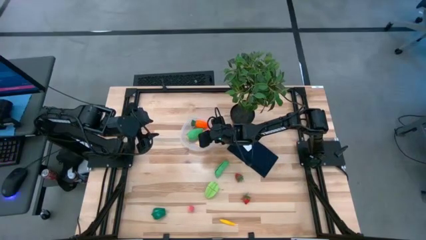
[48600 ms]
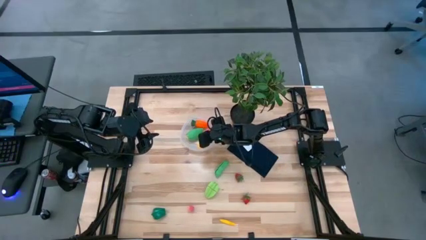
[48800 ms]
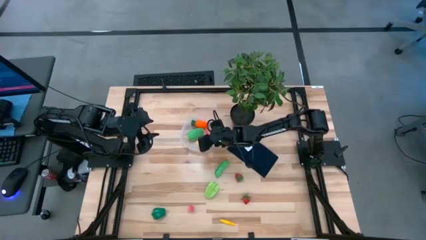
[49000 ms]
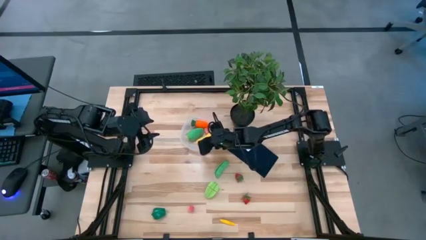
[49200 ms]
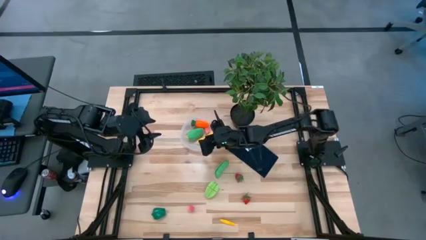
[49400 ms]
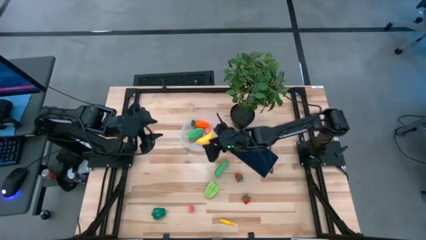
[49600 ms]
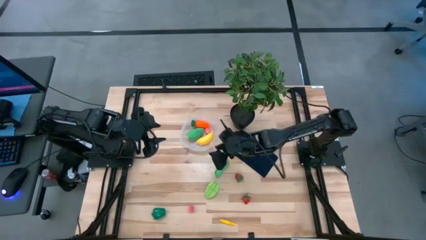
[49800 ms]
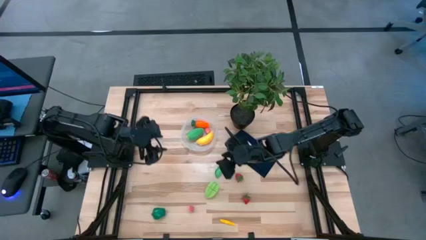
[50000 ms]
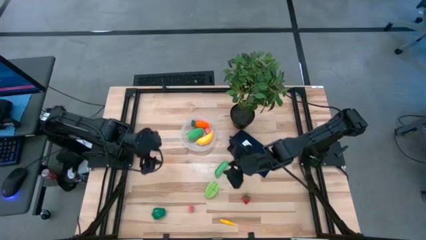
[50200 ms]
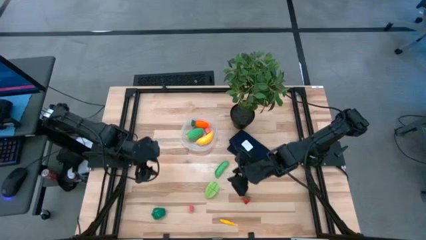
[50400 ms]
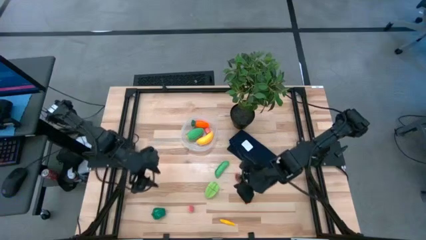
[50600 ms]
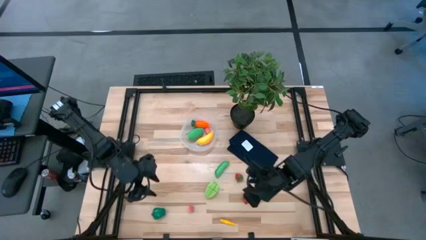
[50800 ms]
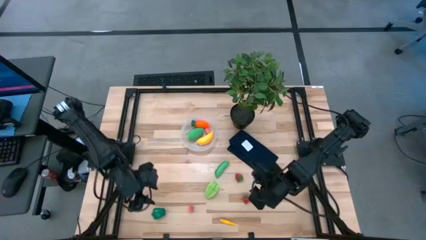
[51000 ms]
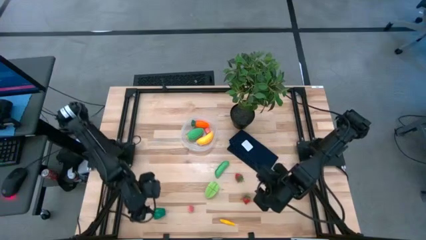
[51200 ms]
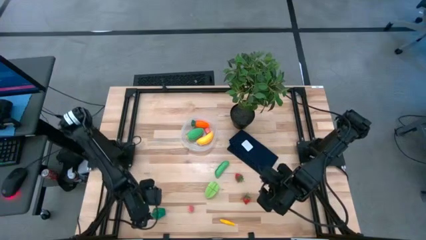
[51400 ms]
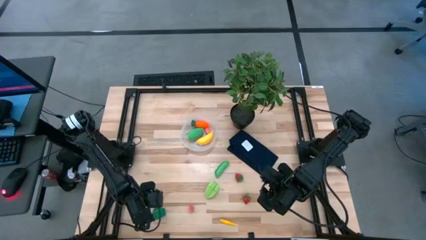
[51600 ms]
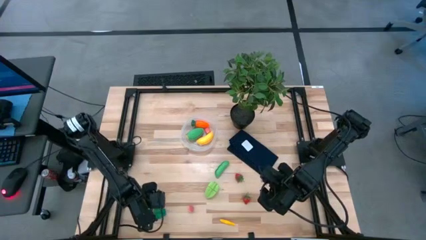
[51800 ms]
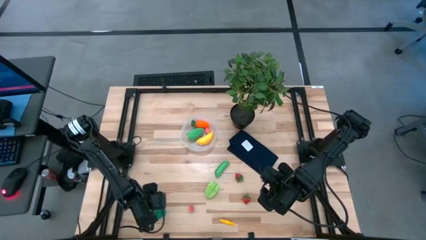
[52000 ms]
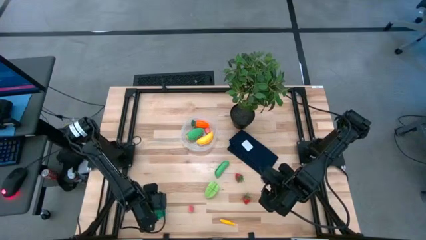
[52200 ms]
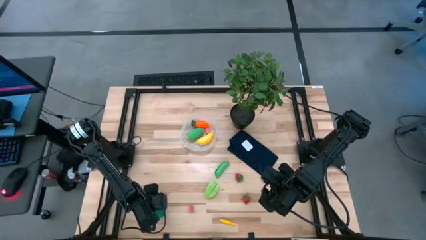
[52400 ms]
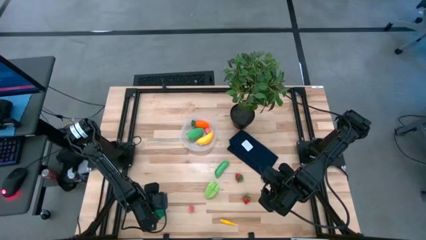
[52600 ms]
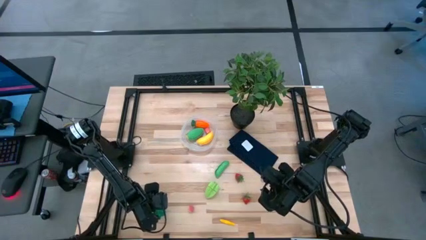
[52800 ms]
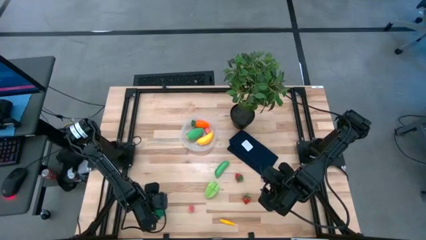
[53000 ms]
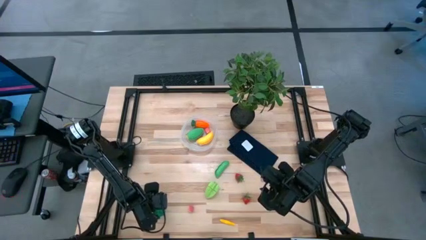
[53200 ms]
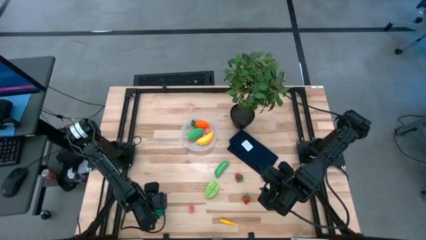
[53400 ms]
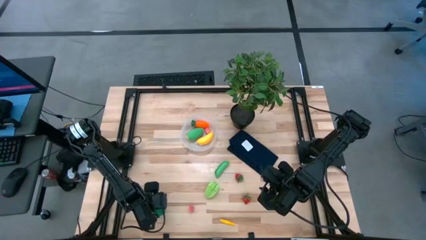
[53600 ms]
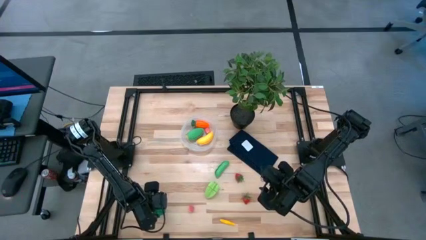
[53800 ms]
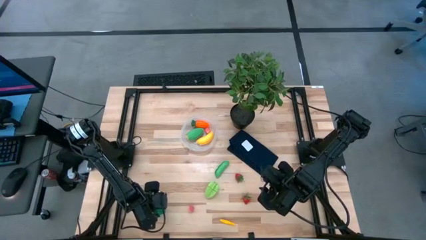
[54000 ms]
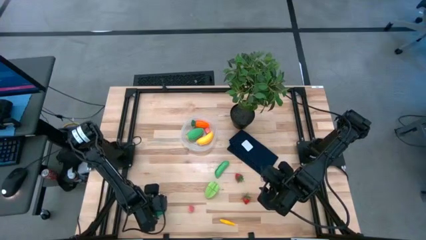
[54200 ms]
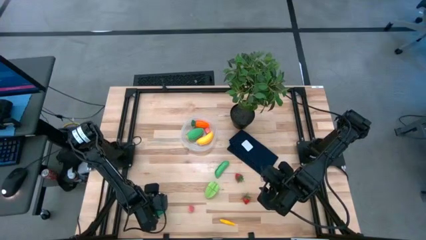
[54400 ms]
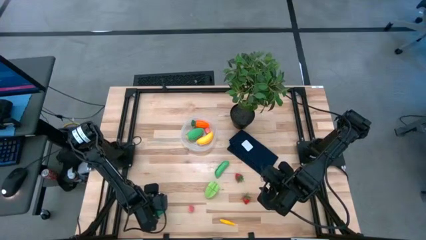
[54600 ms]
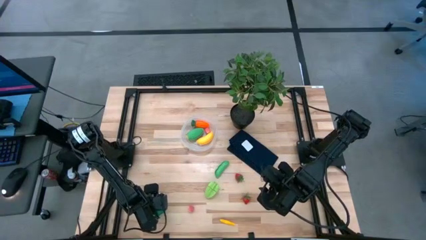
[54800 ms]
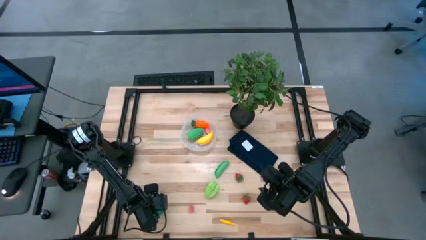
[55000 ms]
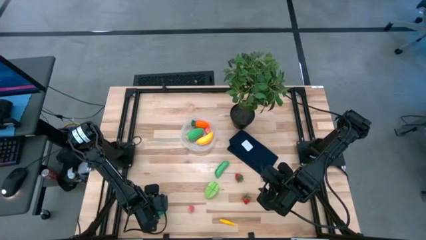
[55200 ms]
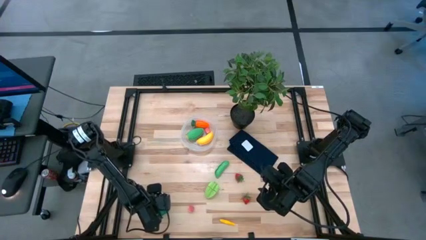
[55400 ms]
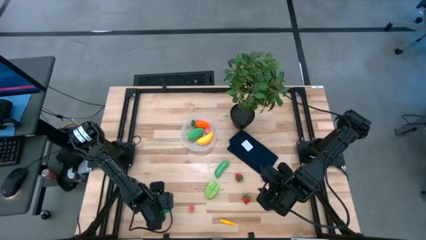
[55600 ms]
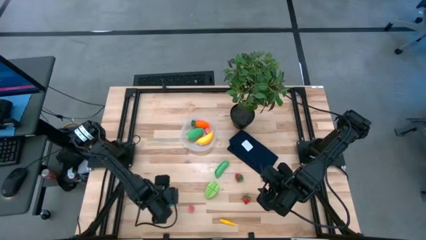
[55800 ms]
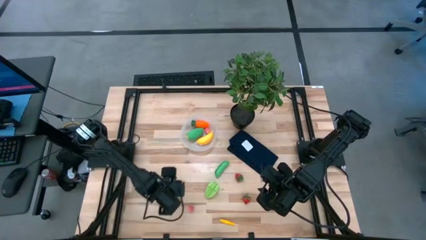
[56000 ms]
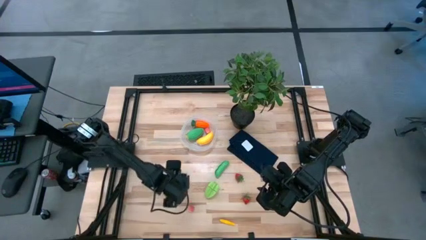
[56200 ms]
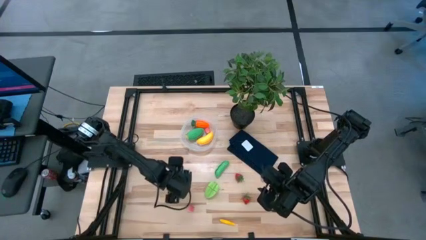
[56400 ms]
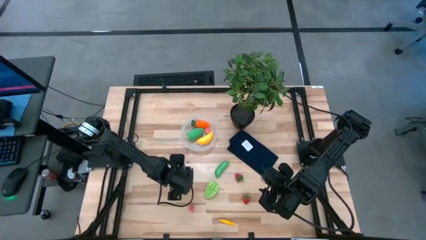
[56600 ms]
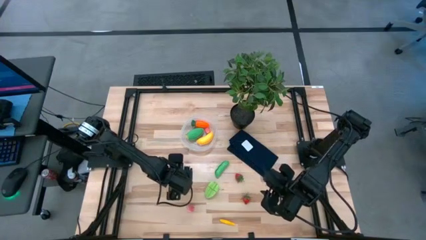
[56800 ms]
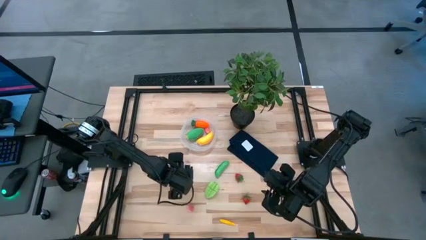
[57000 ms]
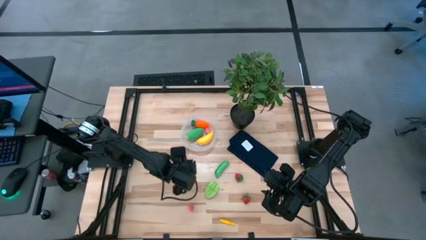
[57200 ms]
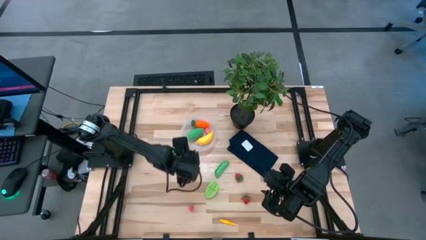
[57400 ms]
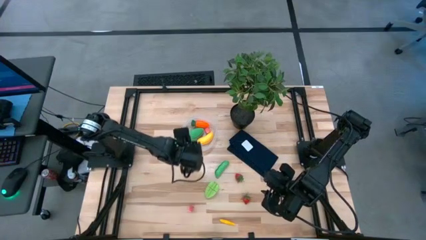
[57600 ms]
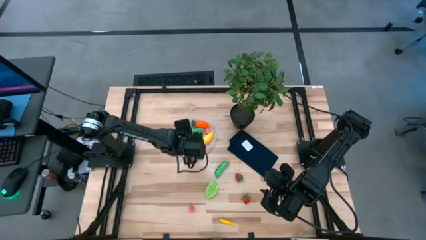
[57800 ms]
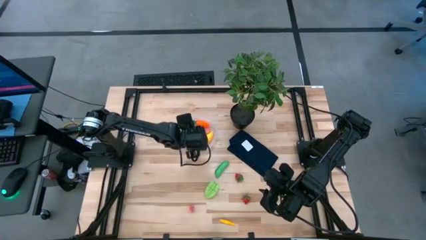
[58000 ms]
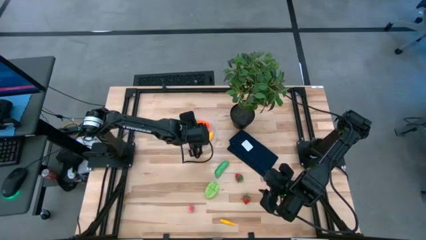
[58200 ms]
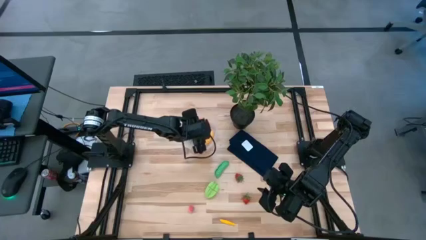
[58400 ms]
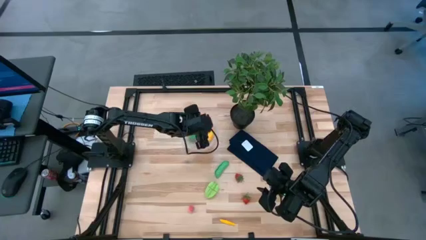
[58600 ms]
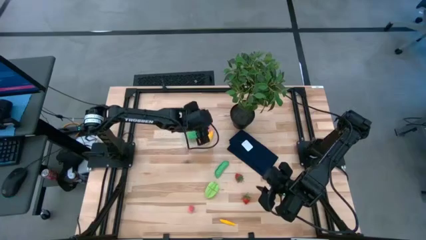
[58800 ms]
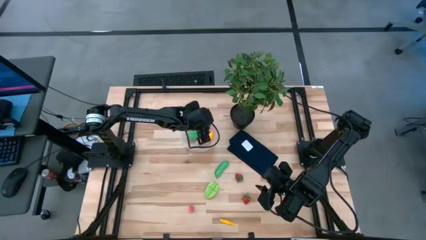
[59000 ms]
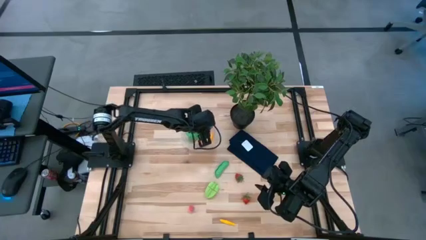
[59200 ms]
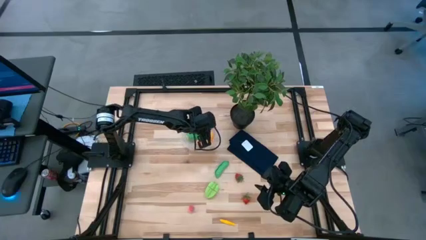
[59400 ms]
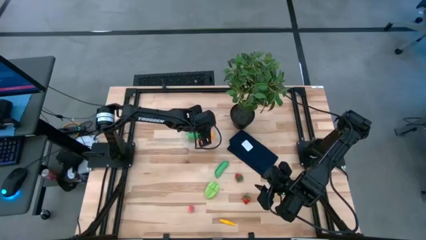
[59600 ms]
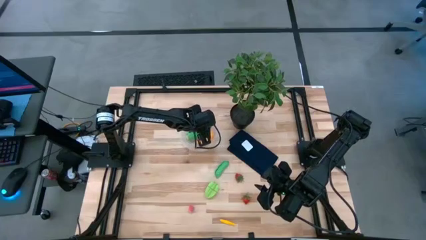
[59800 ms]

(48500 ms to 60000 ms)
Task: Pick and placing Produce into tupperware
Put the green bell pepper into the transparent bin

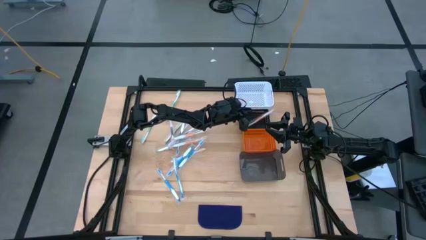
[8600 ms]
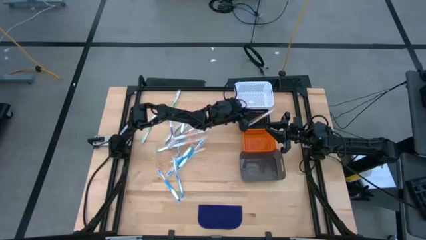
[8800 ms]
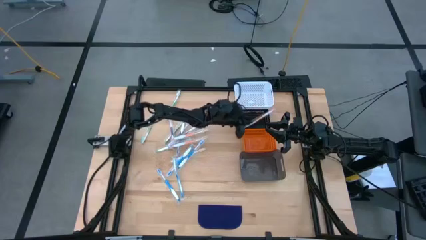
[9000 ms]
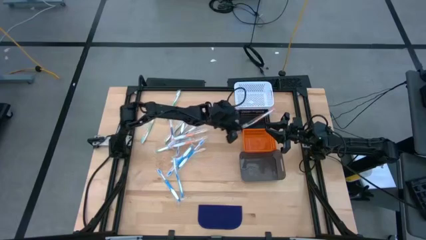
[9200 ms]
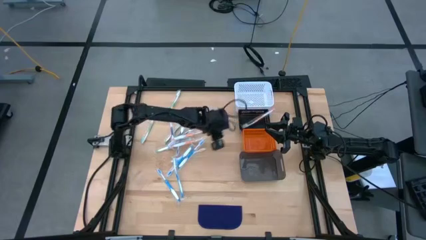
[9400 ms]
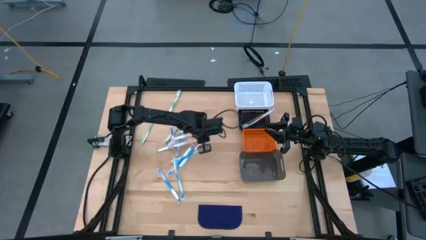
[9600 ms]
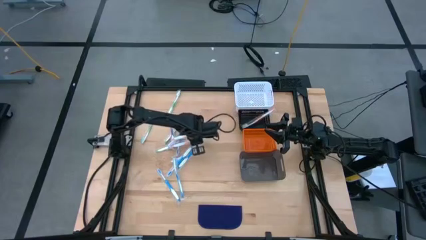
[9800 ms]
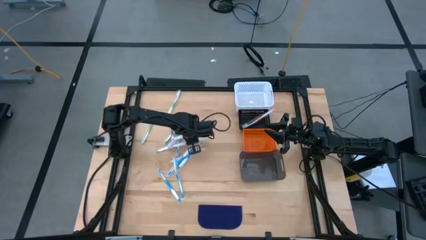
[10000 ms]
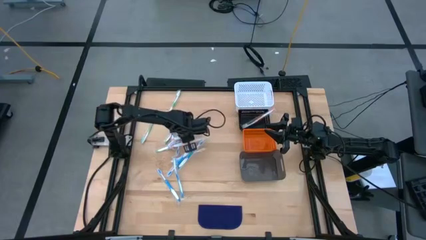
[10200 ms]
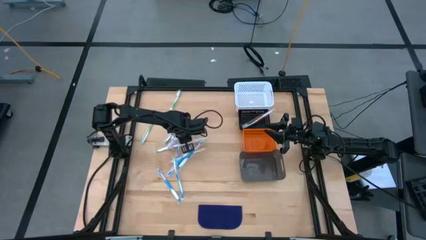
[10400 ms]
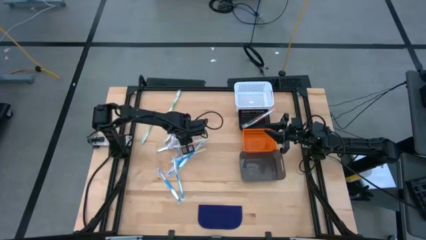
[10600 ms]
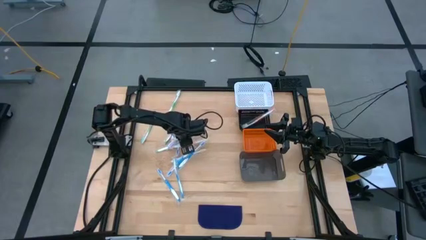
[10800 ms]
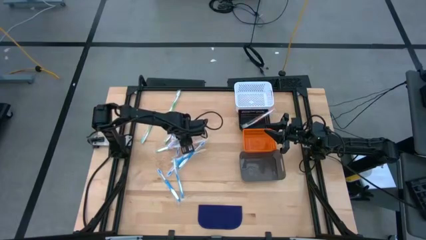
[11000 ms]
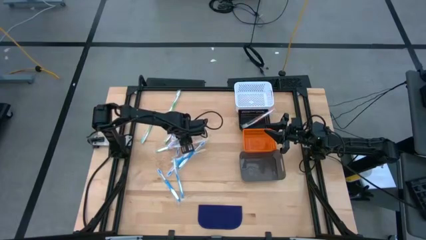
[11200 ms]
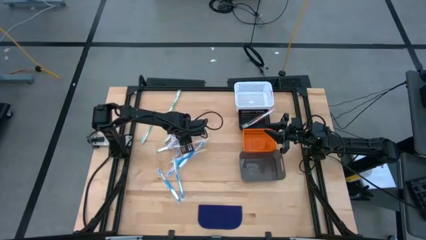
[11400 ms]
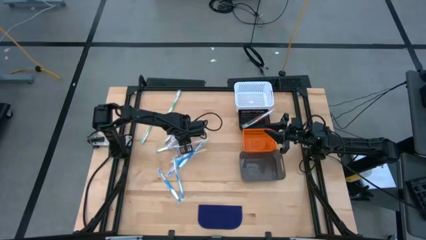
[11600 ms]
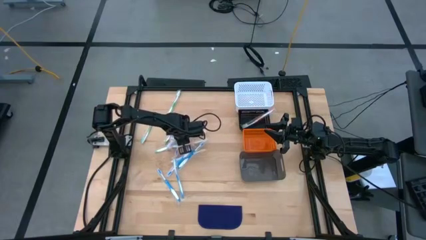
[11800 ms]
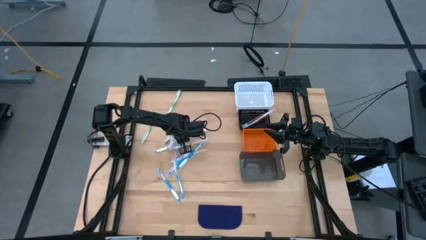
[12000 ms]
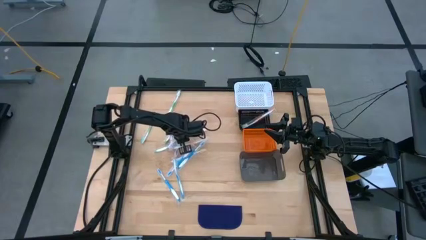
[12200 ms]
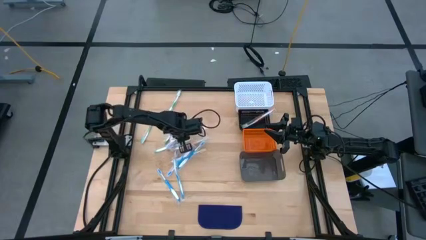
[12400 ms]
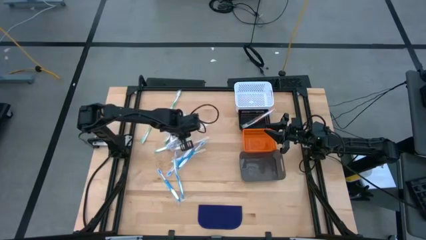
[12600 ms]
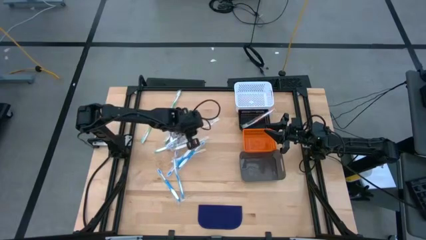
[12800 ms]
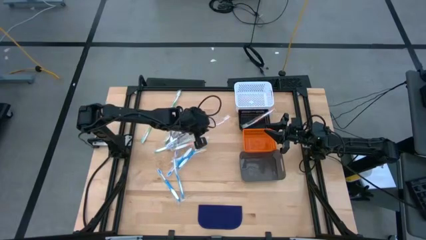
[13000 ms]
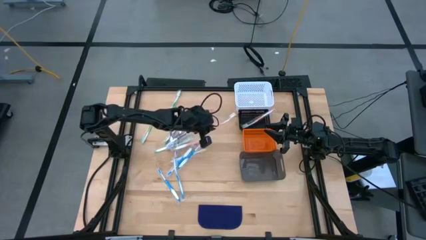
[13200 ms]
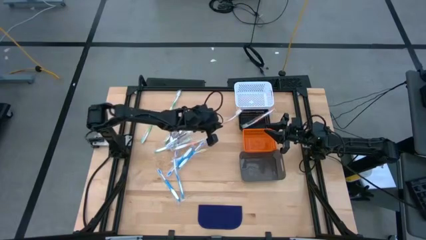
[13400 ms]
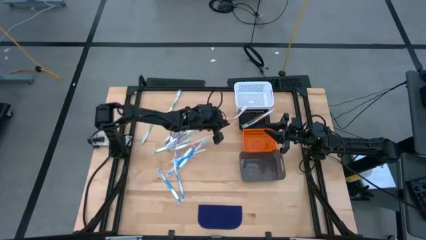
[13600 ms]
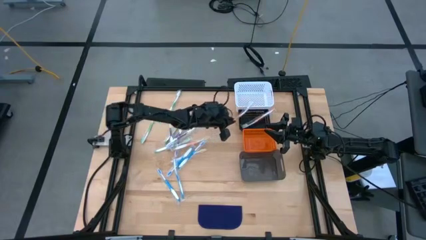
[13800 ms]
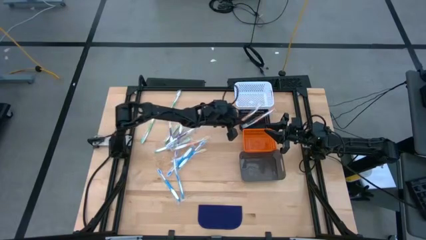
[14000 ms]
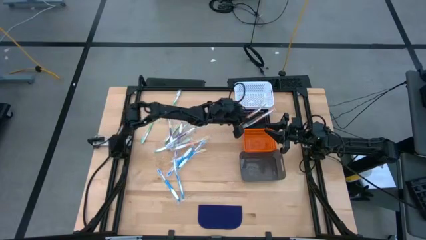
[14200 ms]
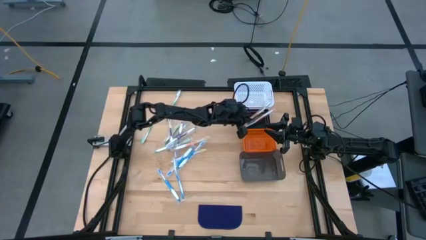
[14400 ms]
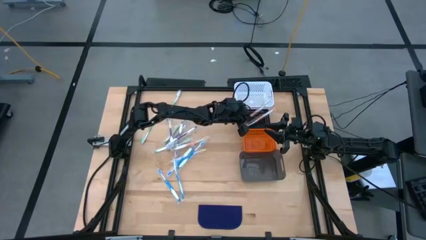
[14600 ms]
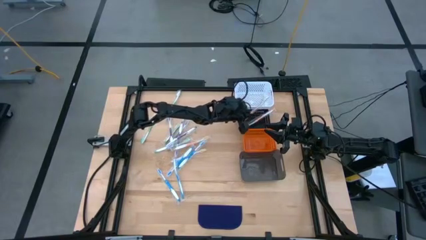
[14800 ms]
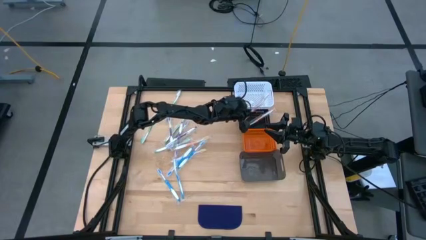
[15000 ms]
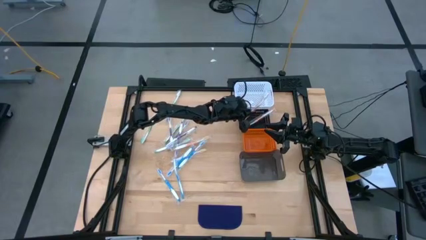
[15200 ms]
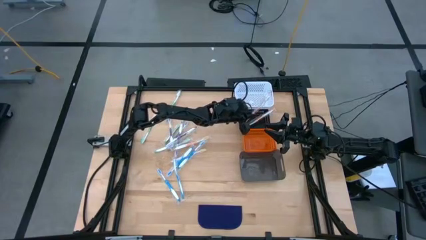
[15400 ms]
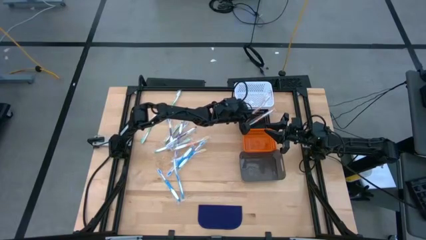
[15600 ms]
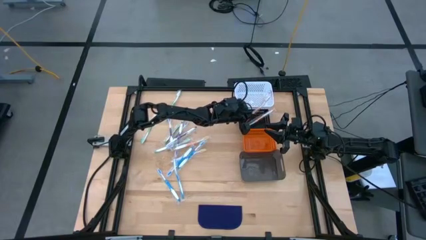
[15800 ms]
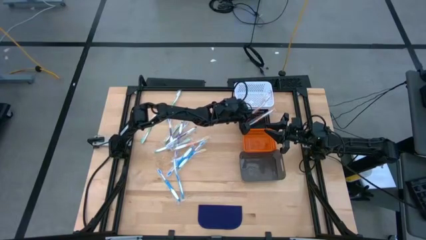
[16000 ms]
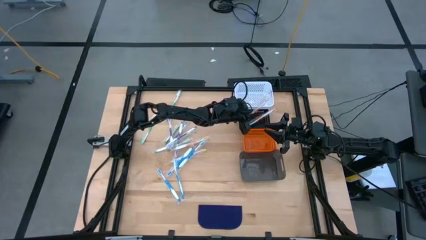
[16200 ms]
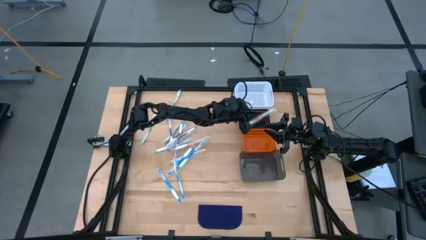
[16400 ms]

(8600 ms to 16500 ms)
Task: Pick & Place Toothbrushes
Put the orange toothbrush into the black bin
